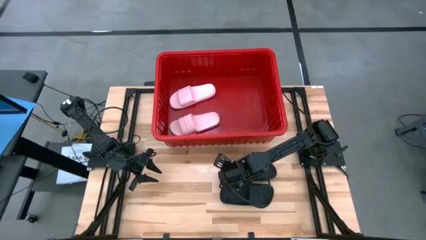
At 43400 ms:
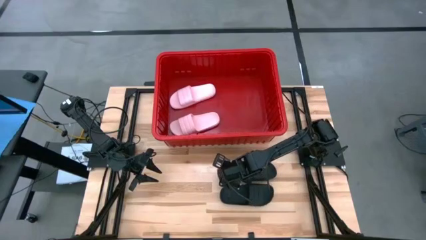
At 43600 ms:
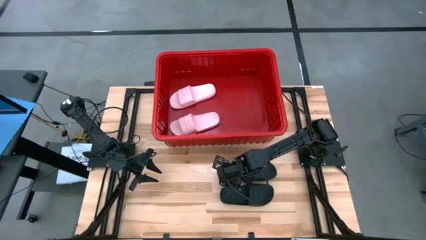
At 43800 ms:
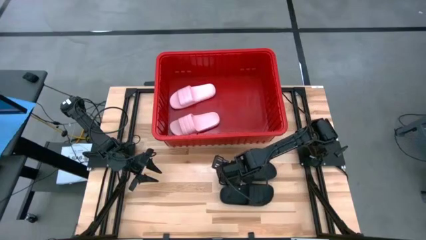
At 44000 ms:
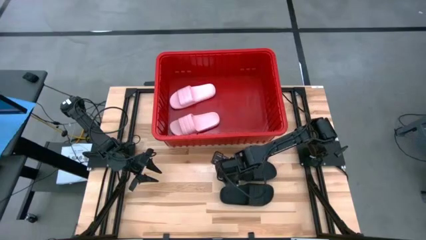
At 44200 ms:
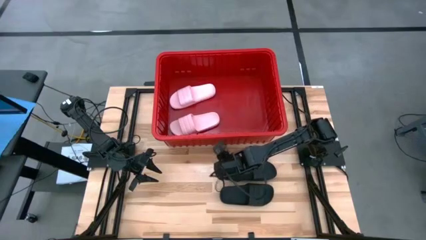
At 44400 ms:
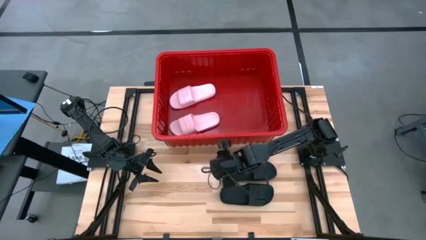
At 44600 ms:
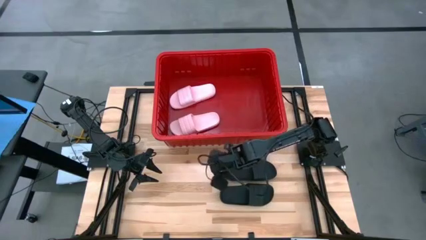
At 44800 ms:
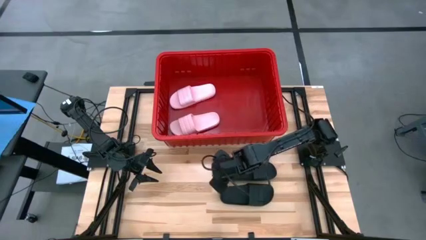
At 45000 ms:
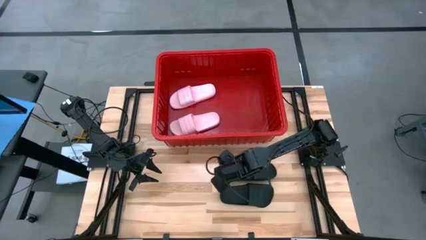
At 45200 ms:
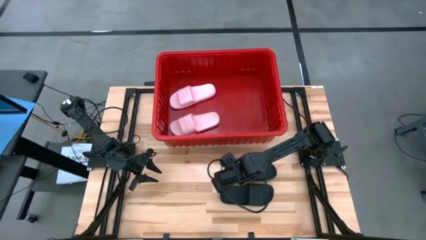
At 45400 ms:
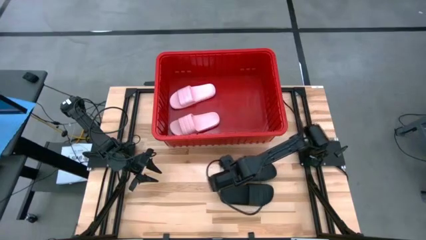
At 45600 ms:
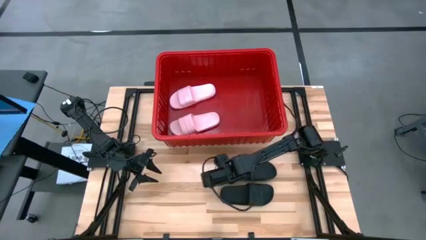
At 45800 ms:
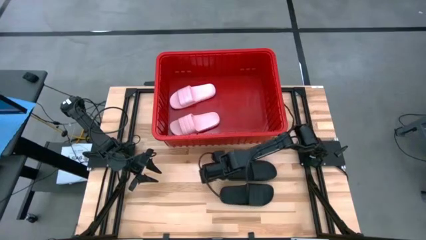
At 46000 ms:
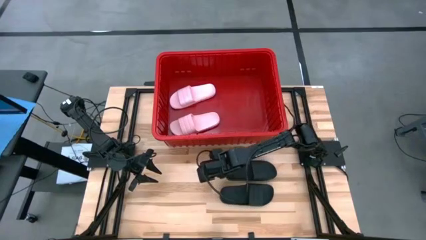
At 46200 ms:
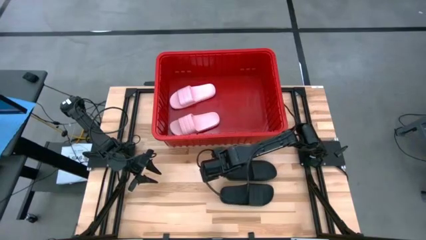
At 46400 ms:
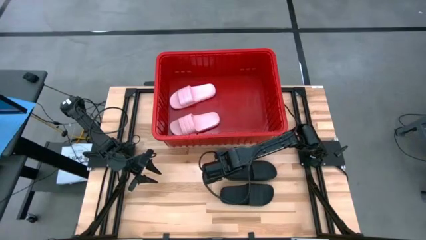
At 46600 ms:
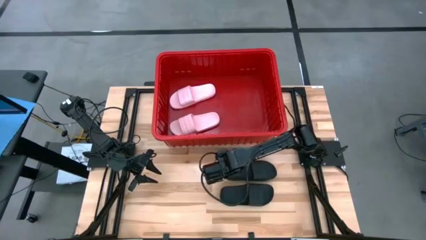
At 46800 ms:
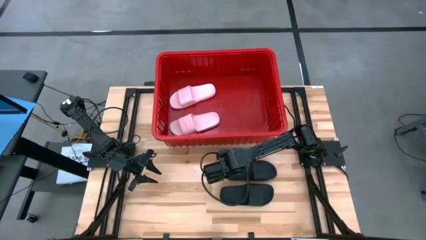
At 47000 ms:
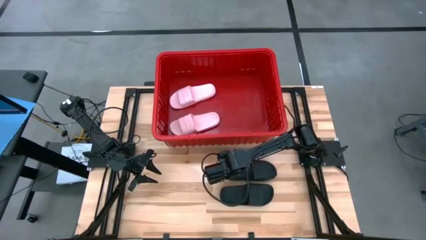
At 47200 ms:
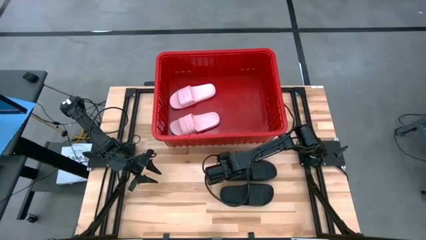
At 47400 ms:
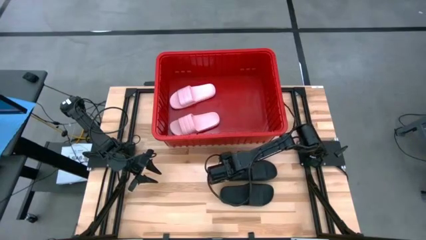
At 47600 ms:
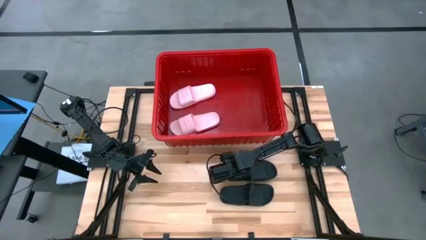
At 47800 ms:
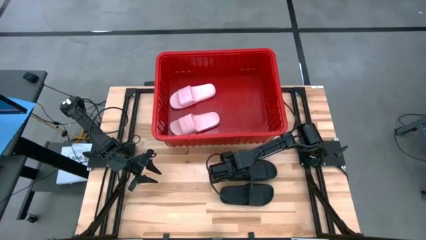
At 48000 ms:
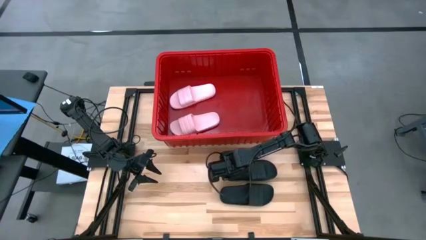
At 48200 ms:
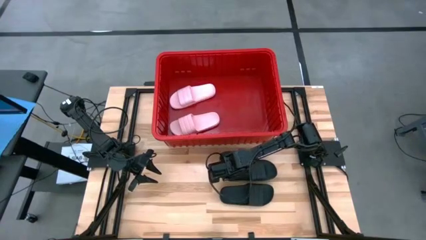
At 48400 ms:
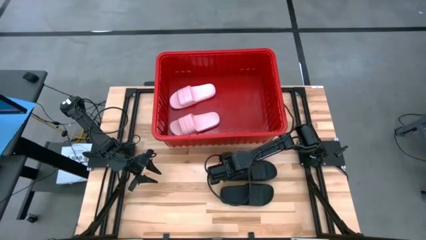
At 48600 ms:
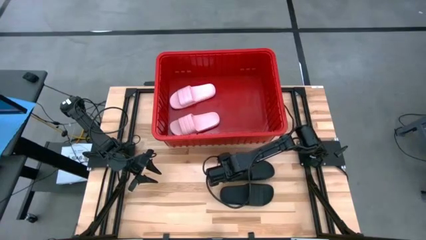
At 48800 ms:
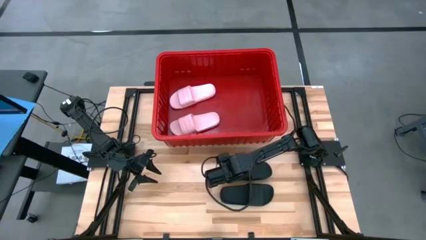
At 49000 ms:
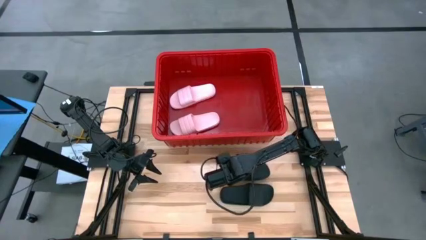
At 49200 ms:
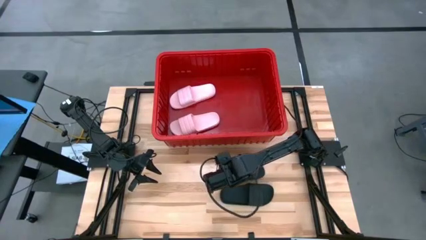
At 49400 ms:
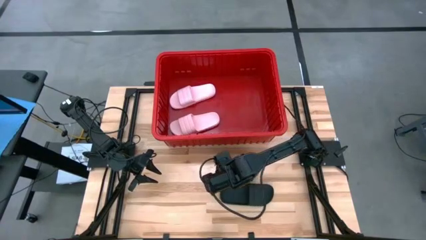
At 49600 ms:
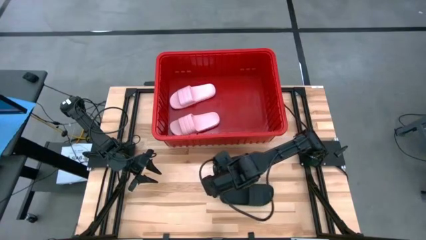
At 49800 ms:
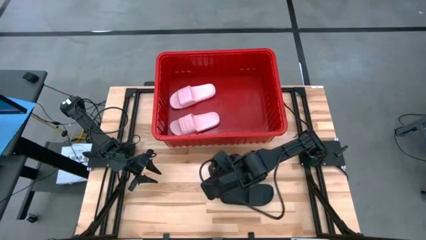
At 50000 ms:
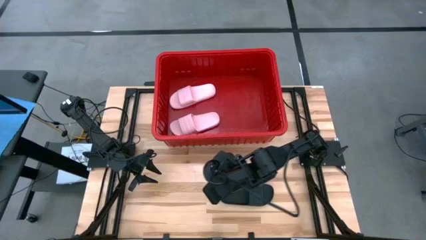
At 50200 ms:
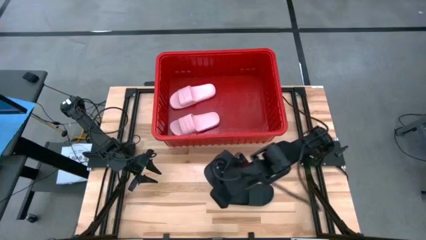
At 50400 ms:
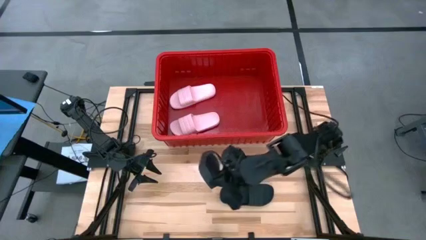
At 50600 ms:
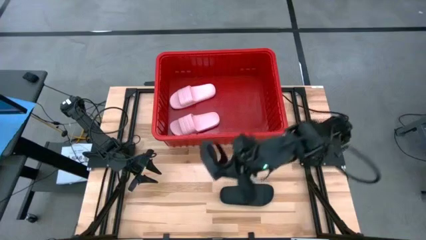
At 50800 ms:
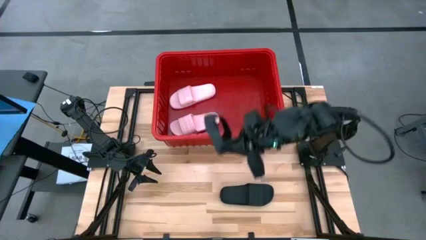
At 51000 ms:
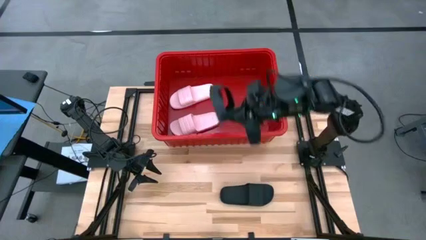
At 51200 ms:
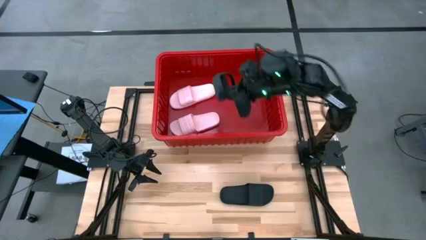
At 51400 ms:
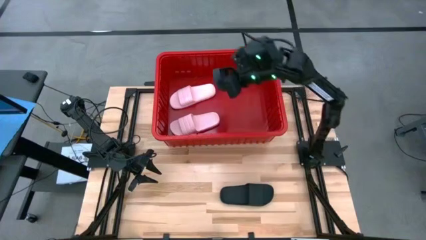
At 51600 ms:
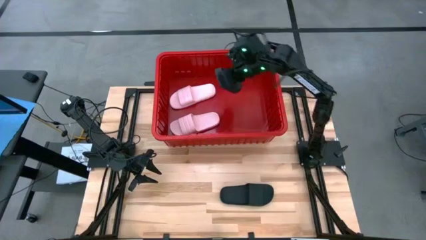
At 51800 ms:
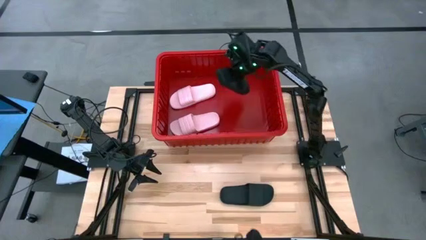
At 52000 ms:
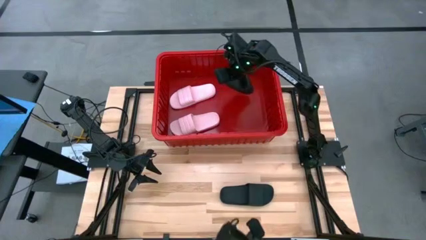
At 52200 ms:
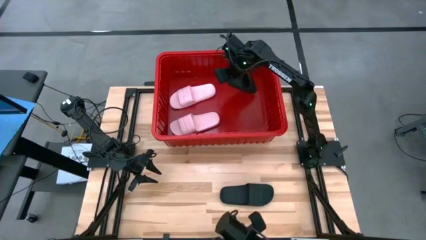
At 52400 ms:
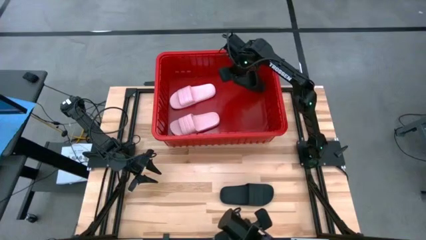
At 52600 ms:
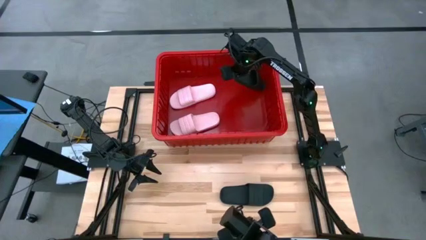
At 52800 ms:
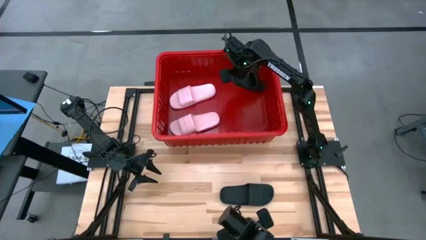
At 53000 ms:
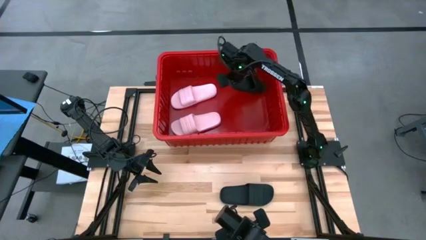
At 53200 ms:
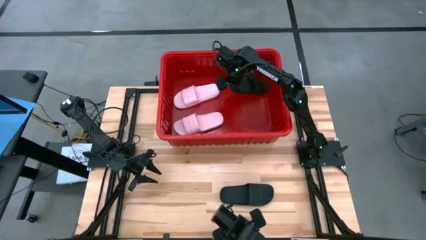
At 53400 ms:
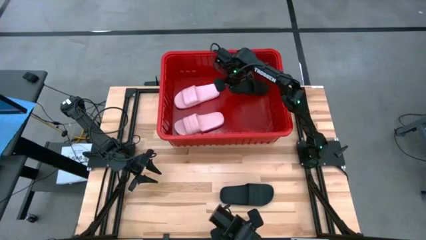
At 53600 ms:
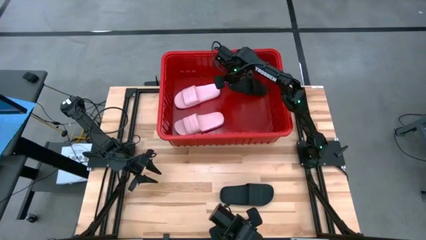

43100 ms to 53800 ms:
Task: Pick and place slides into bin
Put the top black slide into the red bin
